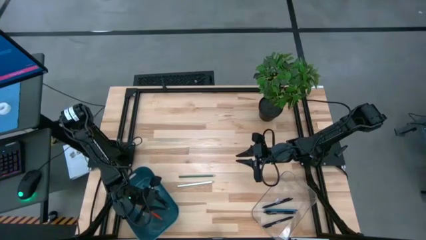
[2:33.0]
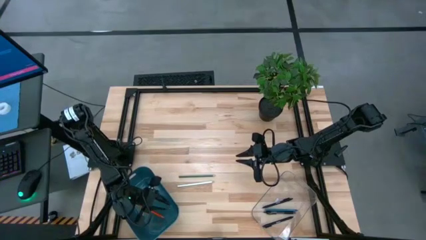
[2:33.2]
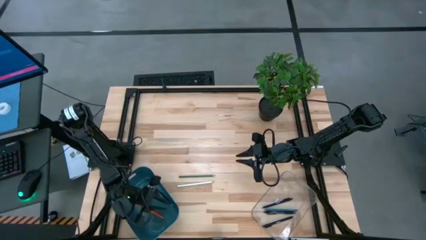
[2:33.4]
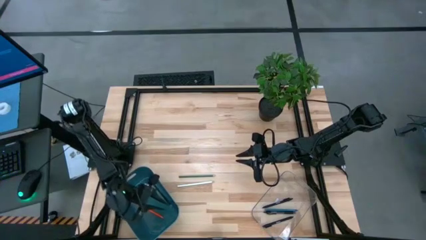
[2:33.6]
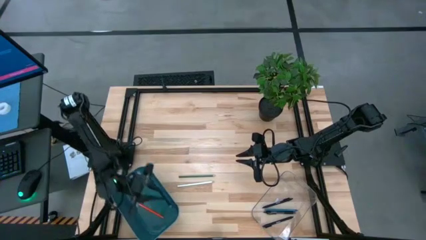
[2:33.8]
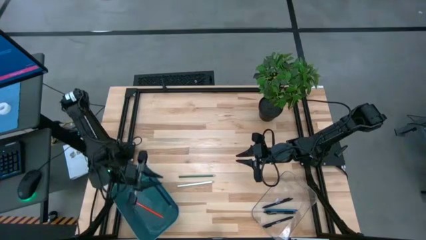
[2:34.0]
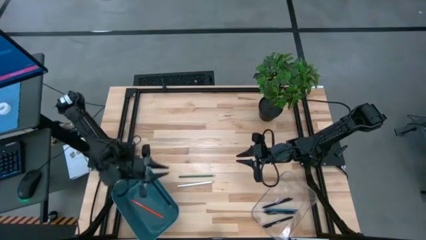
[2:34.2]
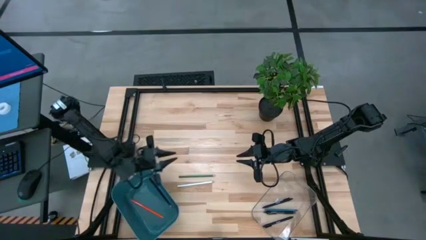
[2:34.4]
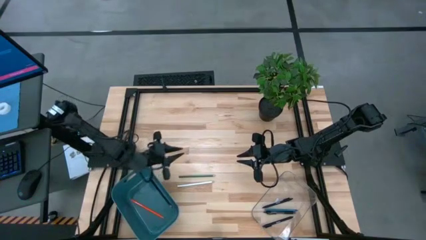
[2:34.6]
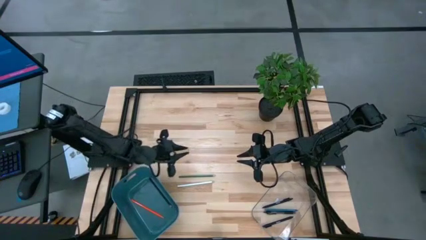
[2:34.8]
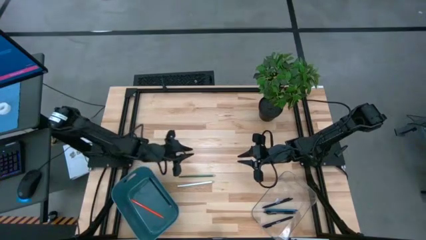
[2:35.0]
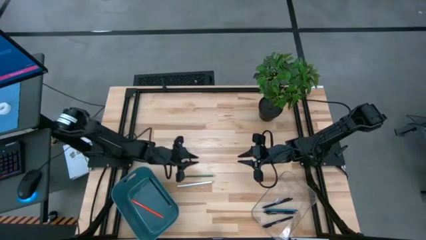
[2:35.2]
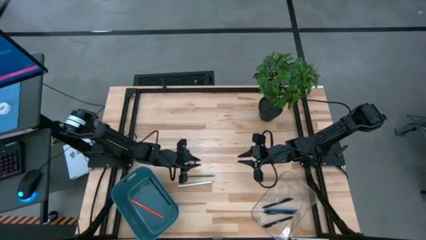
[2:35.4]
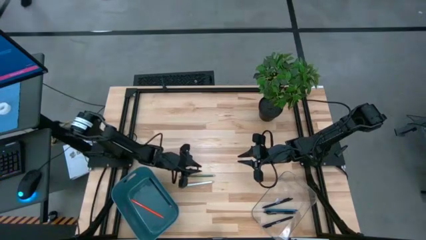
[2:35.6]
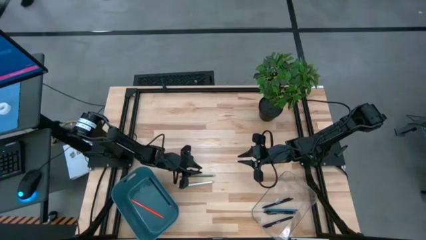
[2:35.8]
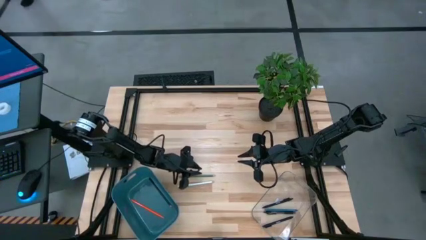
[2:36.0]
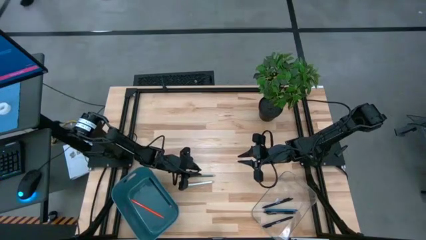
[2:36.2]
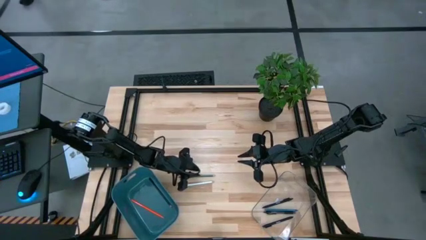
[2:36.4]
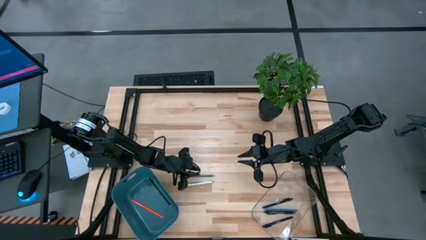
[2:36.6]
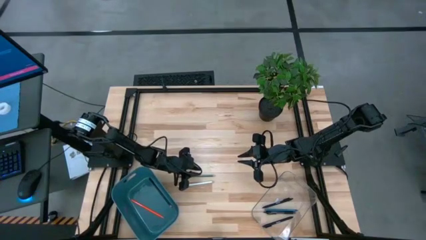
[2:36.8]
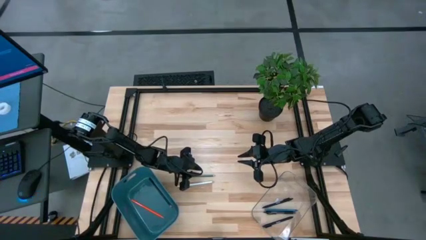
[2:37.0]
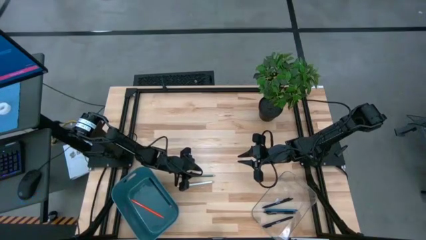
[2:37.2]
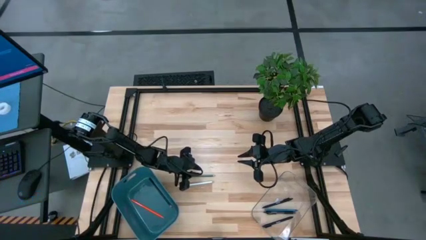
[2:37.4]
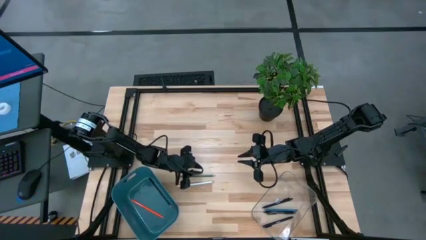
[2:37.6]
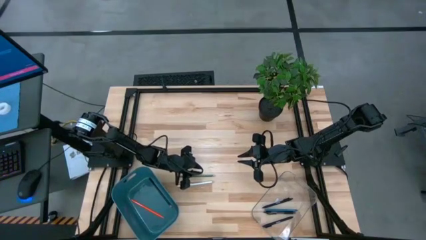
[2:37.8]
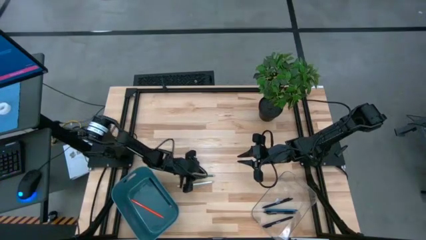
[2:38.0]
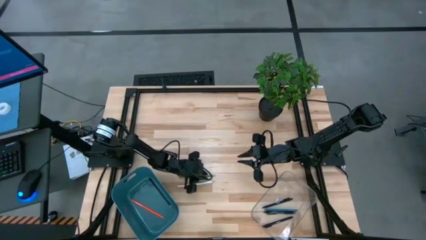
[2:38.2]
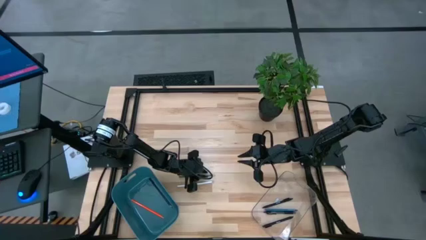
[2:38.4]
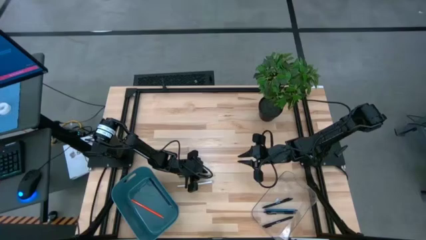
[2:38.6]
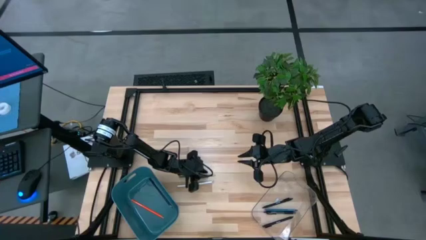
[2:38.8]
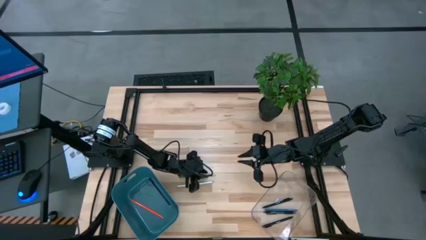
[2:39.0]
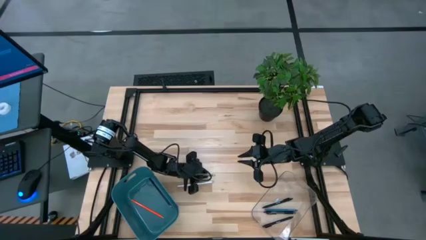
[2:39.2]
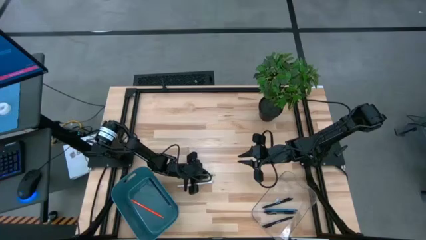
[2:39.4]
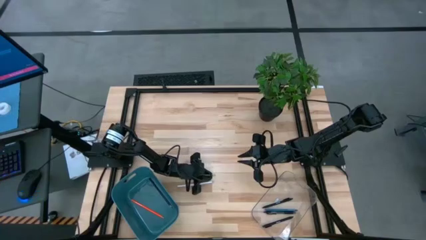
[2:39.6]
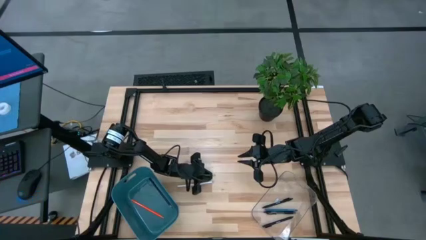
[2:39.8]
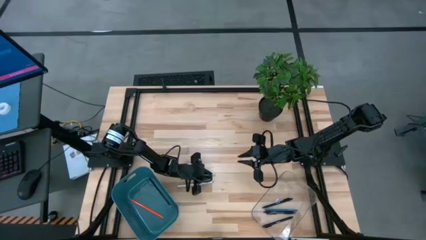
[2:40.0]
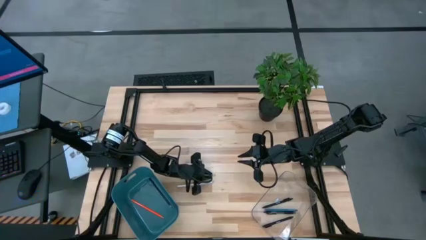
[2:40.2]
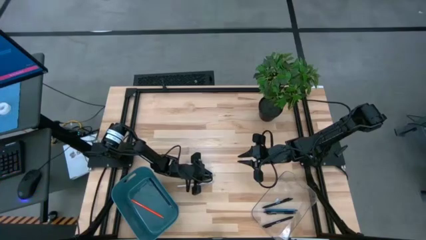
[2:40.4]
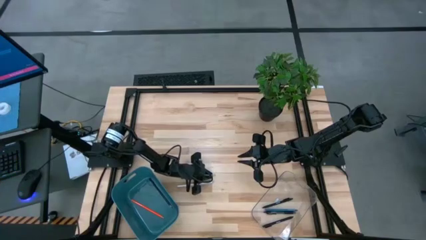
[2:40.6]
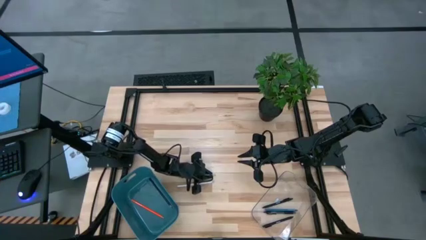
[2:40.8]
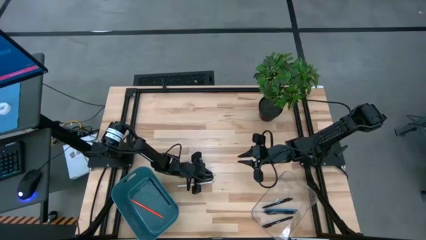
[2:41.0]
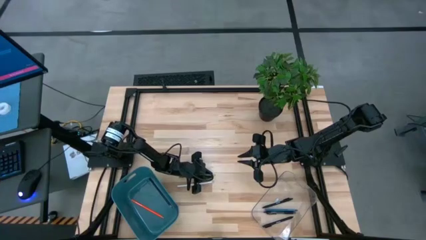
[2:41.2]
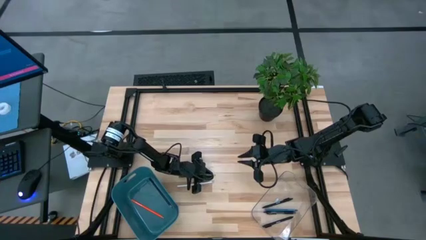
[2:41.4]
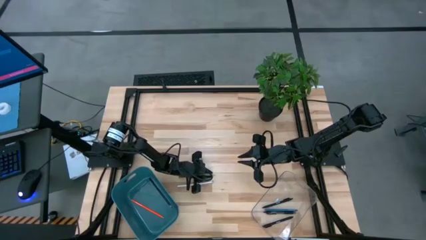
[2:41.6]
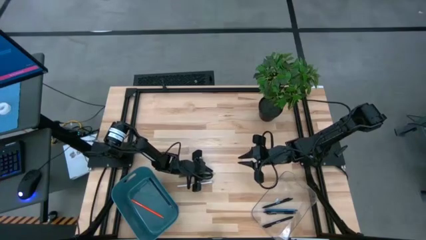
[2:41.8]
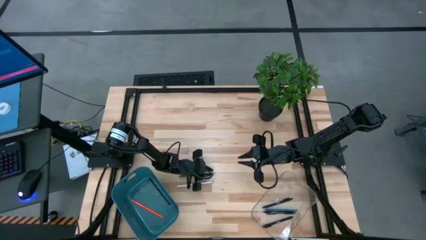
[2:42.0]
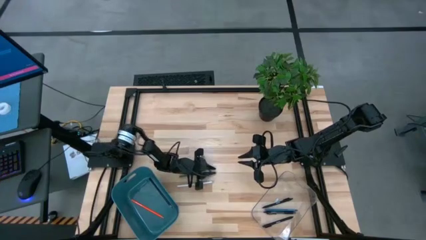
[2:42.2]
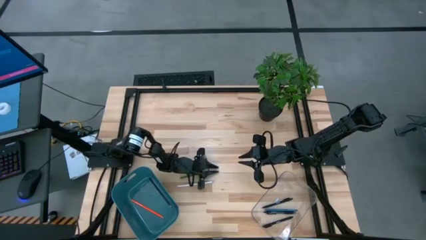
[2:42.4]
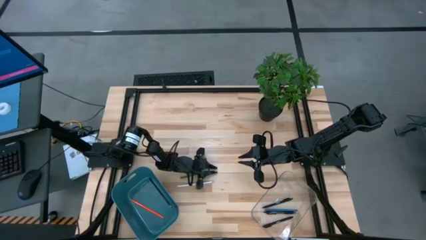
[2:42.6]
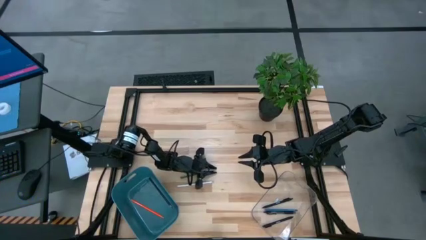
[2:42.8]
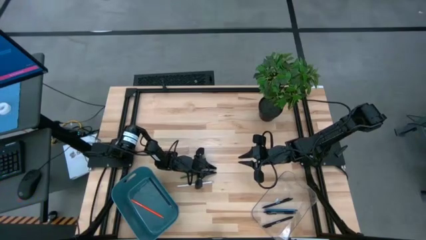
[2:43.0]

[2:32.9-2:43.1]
Task: Sort pens & pencils
Put the green pencil in the blue bin
